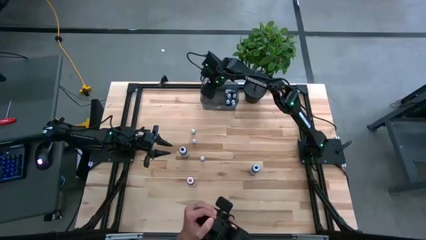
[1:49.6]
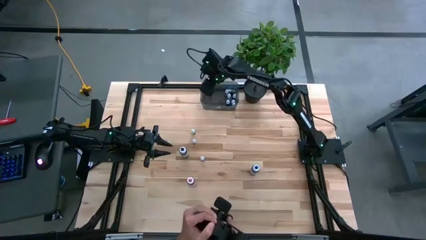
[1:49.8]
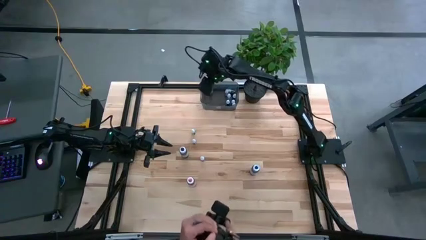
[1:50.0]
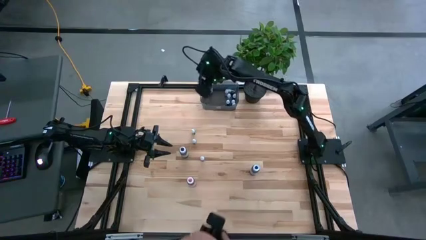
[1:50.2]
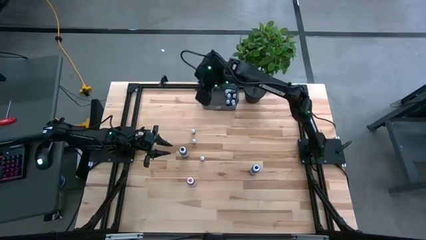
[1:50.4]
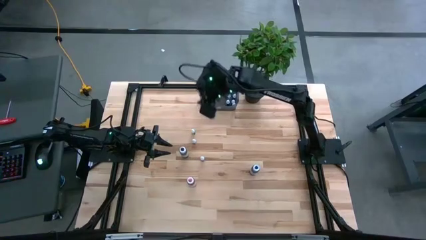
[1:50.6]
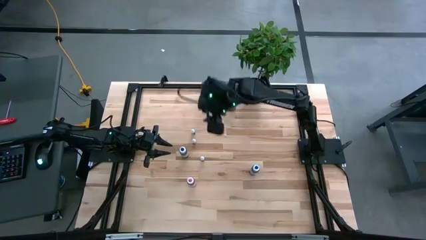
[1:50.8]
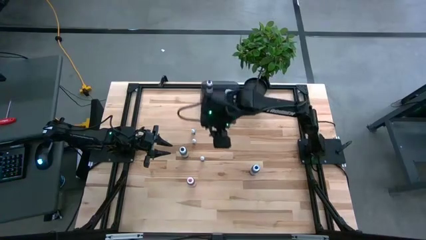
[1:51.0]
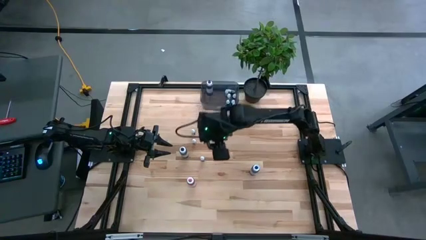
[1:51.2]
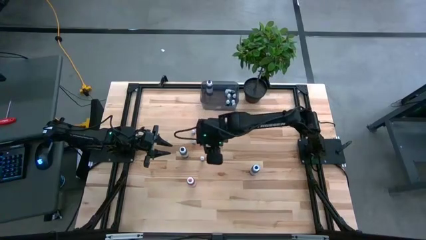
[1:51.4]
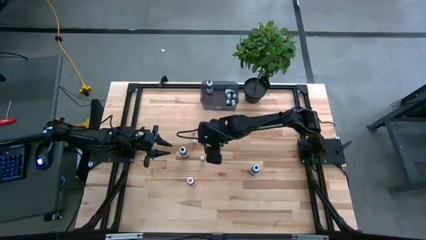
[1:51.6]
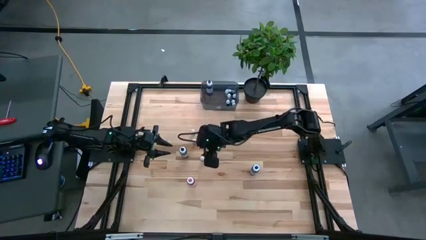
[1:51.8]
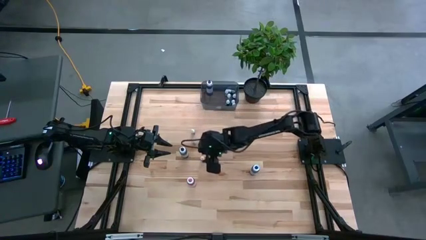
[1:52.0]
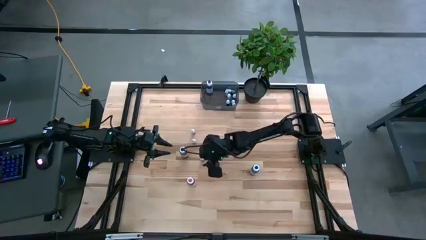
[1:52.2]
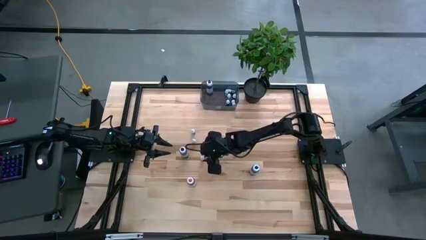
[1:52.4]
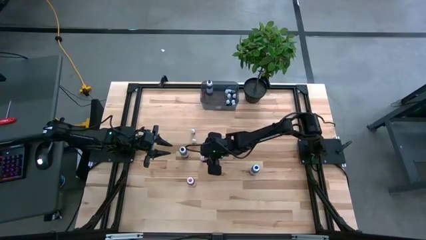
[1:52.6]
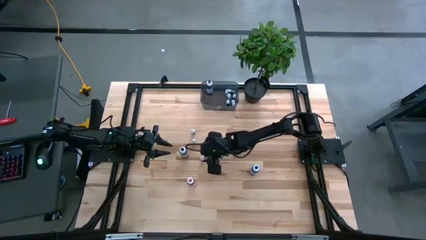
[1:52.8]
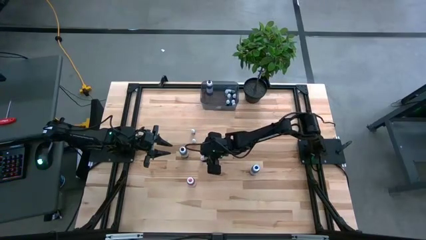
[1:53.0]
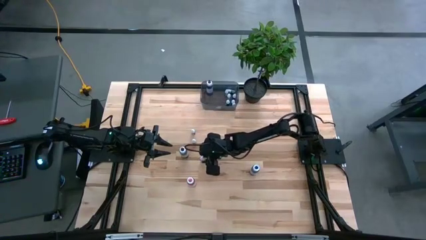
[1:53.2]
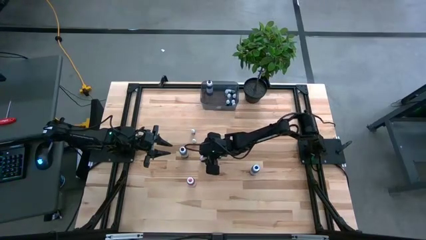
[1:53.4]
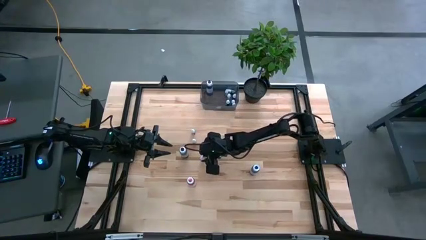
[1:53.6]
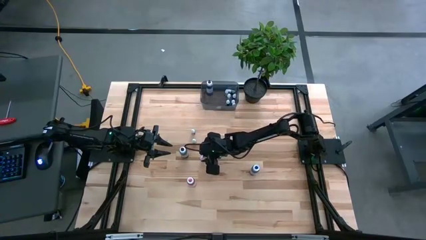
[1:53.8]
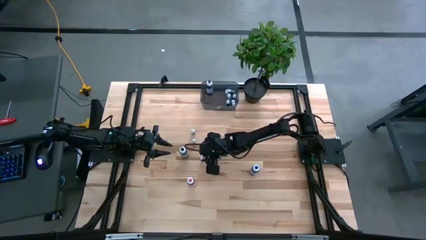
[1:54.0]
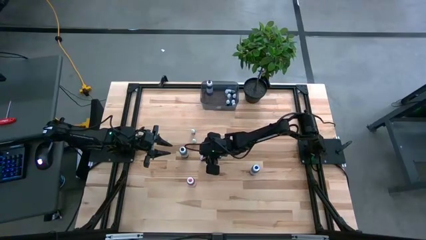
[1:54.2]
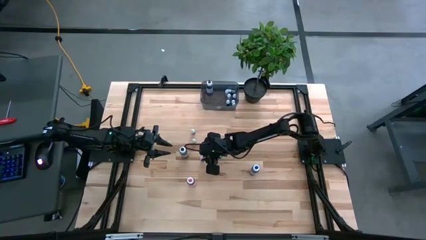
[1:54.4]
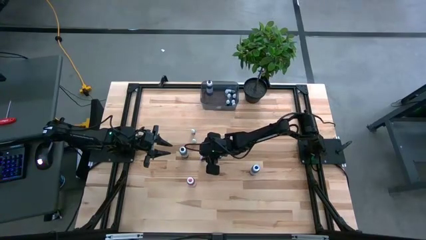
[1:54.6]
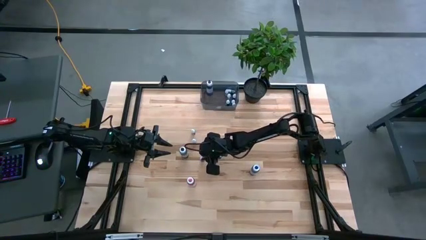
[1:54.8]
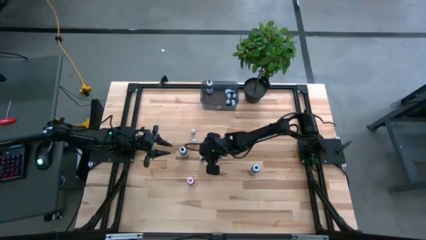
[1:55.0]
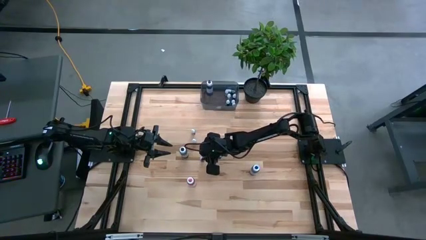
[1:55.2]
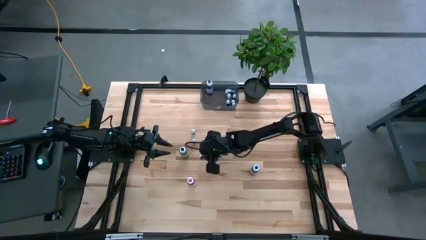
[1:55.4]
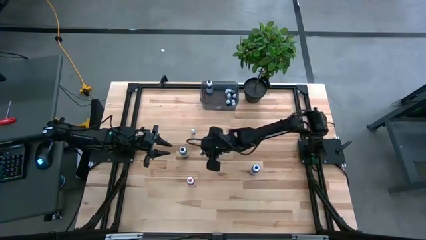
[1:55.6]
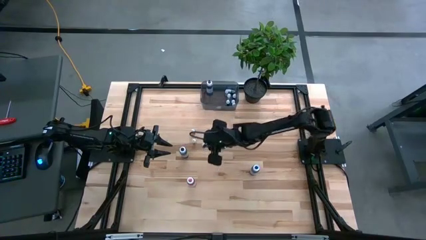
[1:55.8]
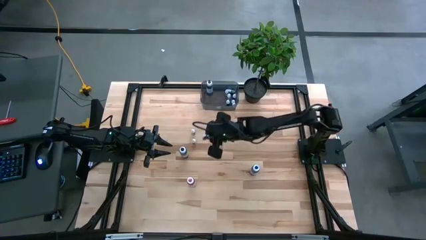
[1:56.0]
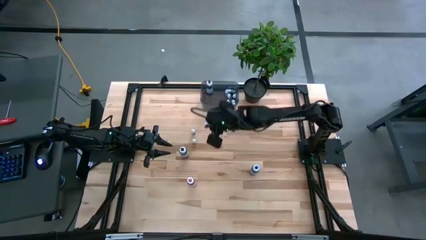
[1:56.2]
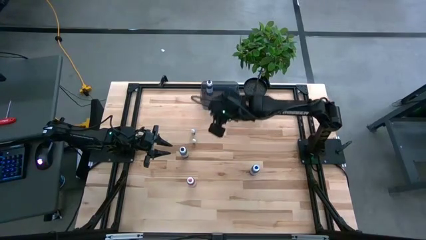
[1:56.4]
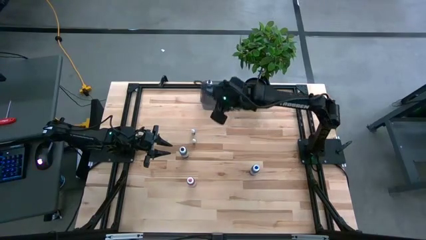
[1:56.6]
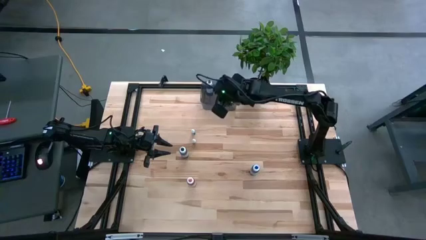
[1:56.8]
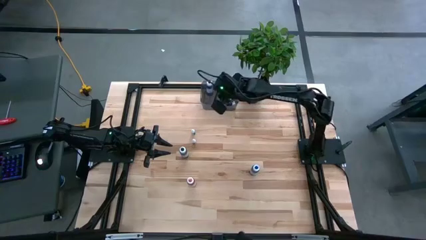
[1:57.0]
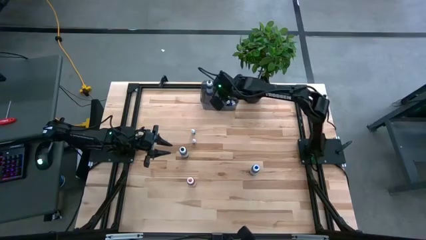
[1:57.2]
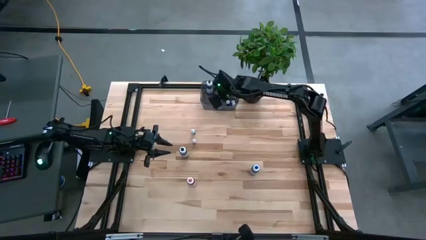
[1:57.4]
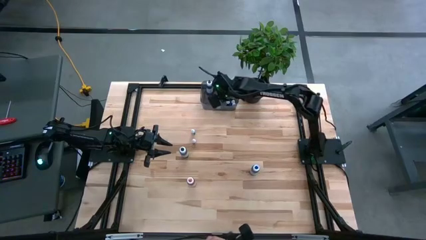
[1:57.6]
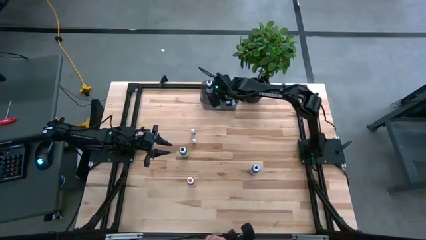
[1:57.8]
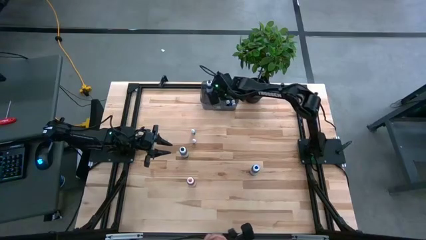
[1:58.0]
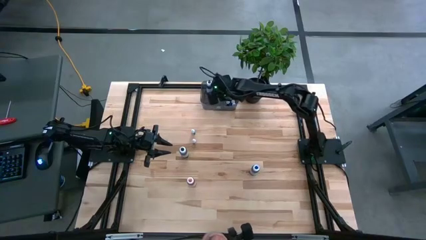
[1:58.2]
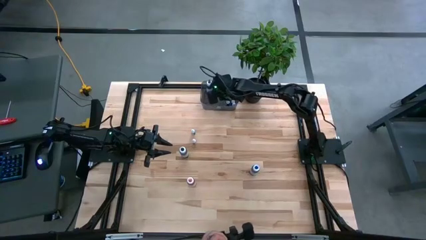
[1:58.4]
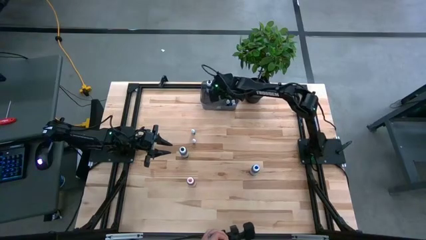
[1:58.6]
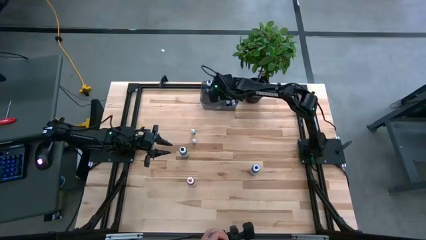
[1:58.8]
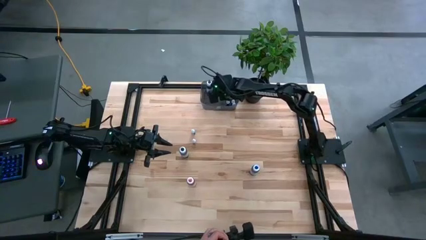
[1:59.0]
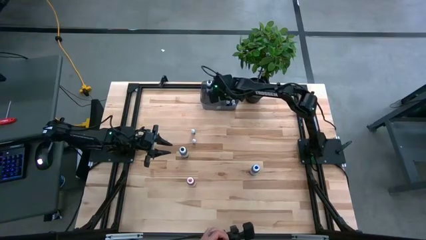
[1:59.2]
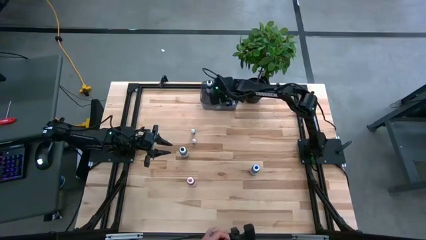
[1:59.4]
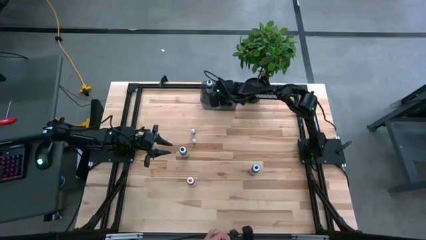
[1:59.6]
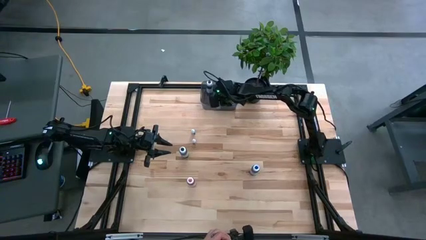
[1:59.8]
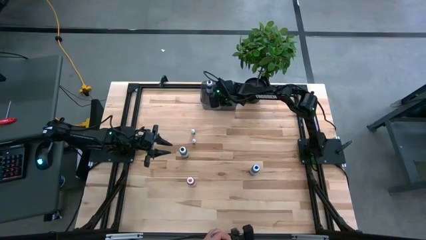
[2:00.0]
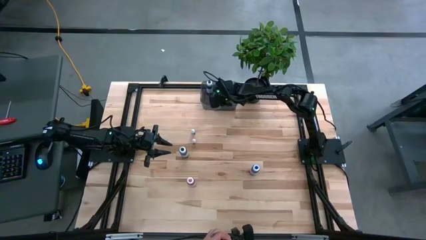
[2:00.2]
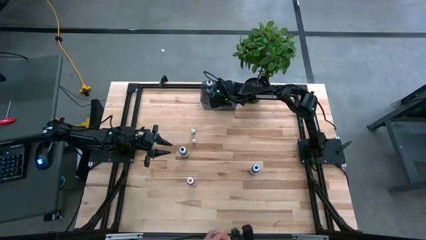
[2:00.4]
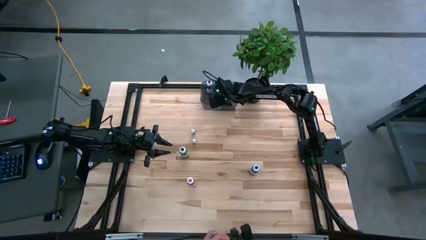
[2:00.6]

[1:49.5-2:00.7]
Task: Pick & Place food coloring
Put the bottom small black food coloring bottle into the black bin

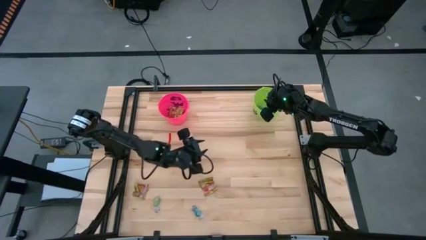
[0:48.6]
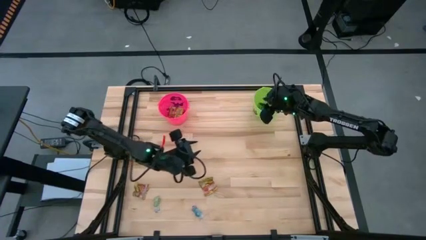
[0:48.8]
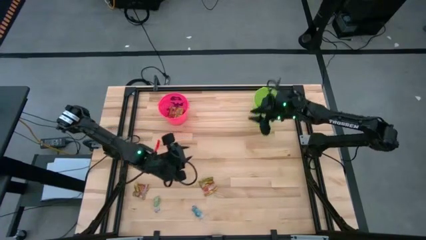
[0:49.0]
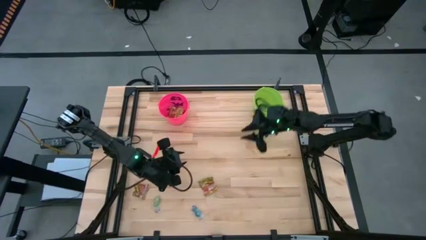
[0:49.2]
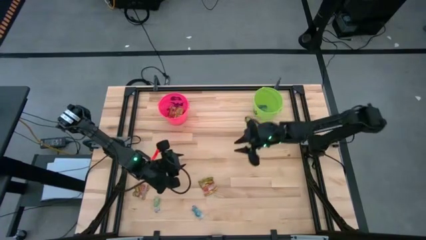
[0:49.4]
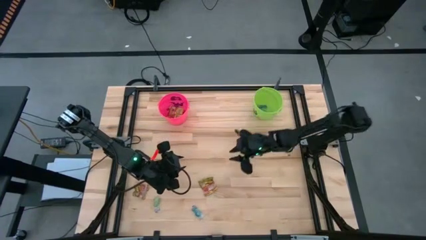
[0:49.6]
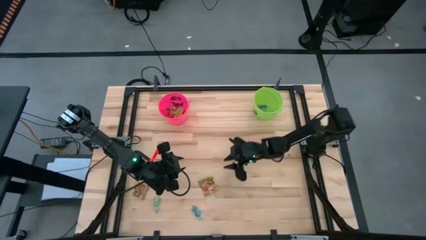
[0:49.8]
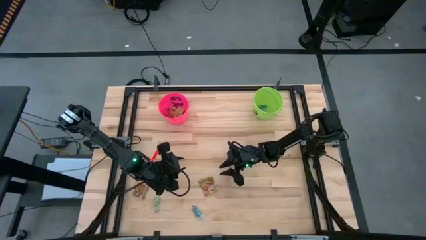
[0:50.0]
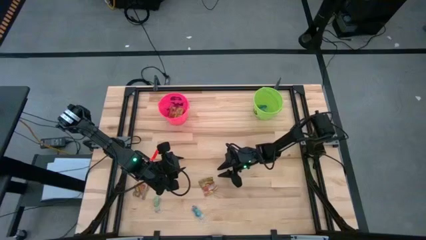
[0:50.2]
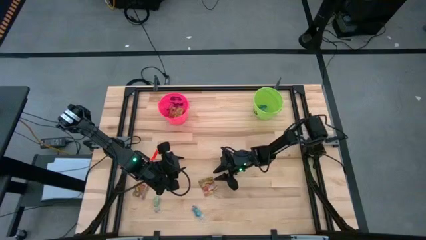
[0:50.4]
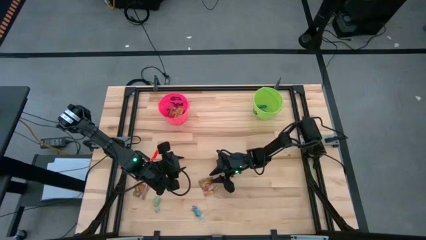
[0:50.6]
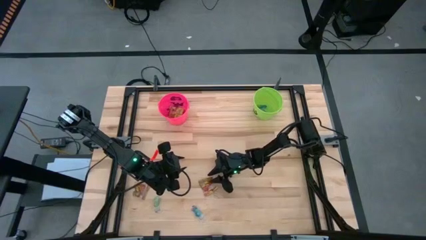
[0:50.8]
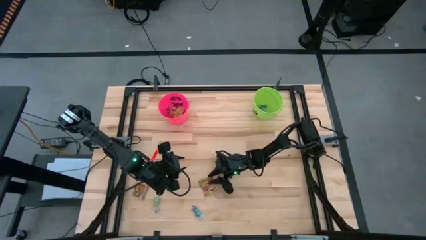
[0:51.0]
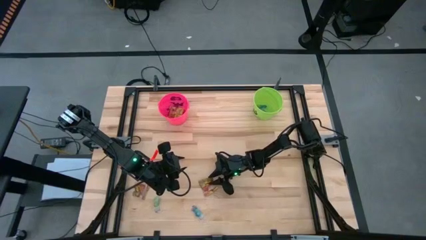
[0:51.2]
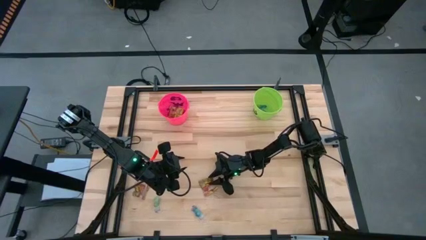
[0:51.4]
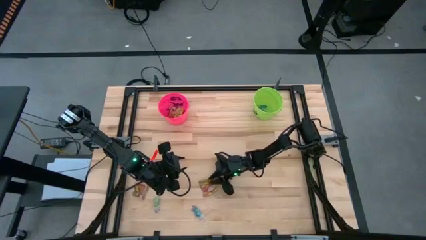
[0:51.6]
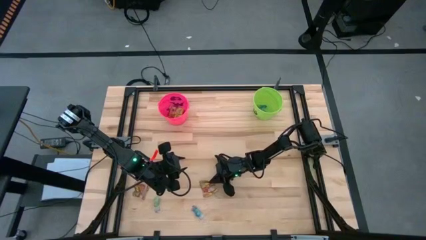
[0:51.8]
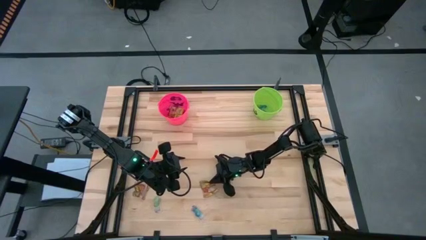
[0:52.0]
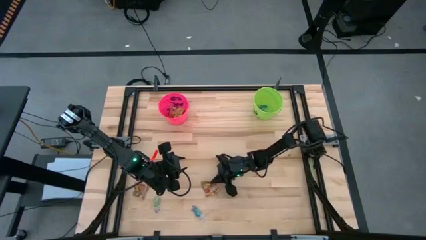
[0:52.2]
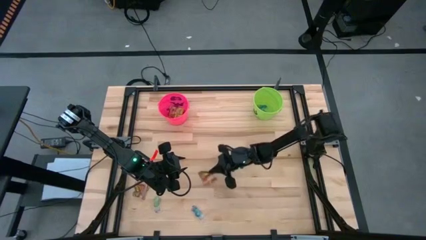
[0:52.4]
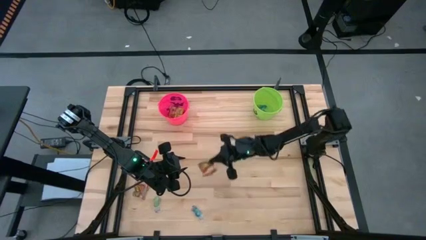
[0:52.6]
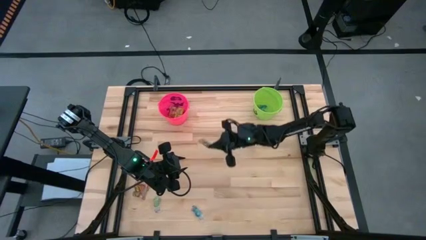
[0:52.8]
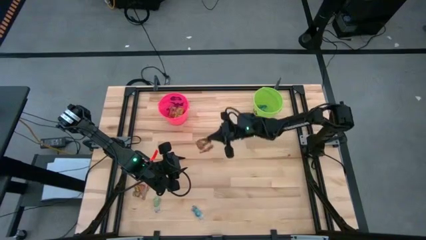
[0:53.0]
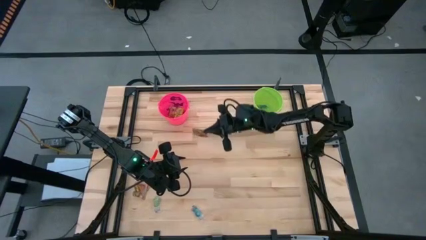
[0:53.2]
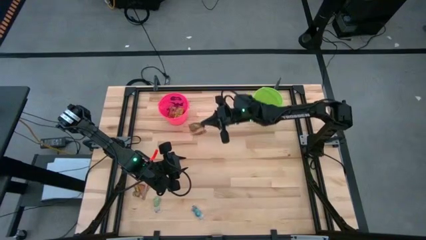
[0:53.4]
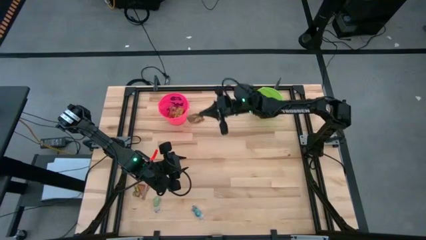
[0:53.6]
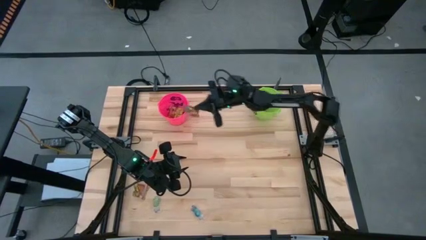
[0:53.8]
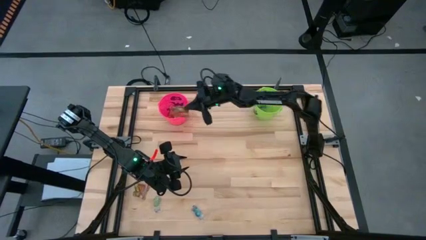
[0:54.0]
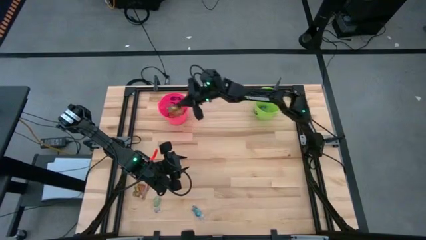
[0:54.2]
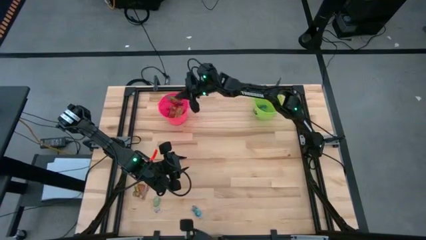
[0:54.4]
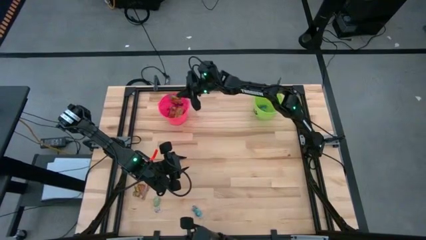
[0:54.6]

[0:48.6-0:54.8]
Task: Sort candy by brand, put in halloween buckets
Put the gold red candy into the pink bucket
